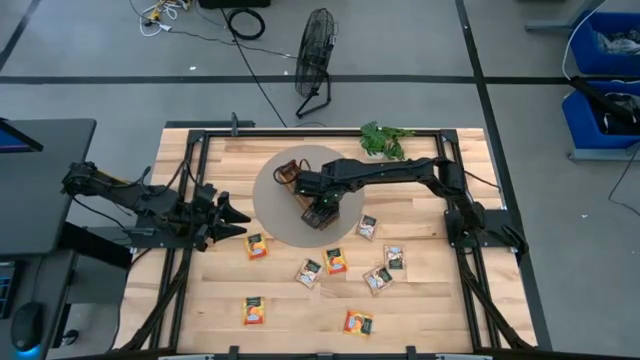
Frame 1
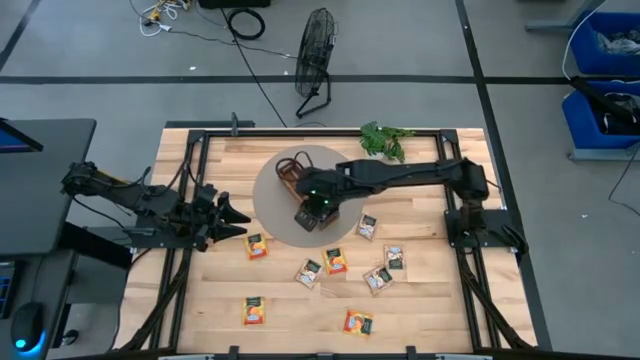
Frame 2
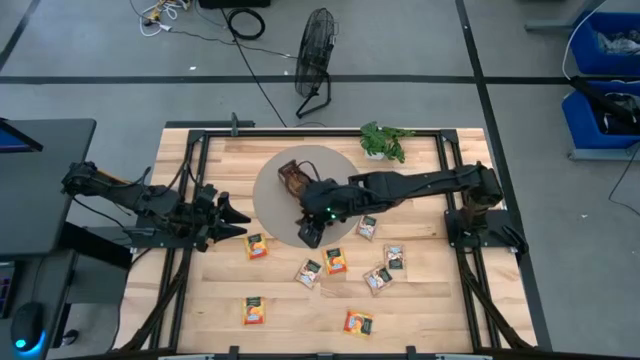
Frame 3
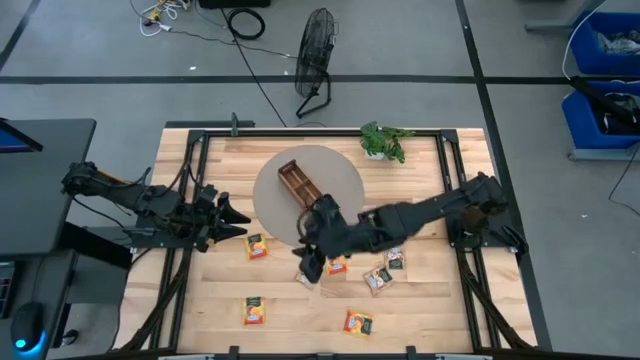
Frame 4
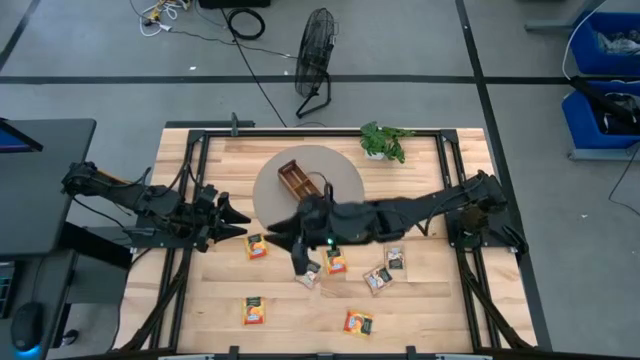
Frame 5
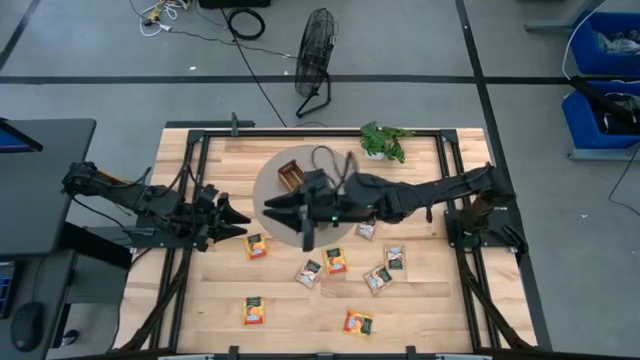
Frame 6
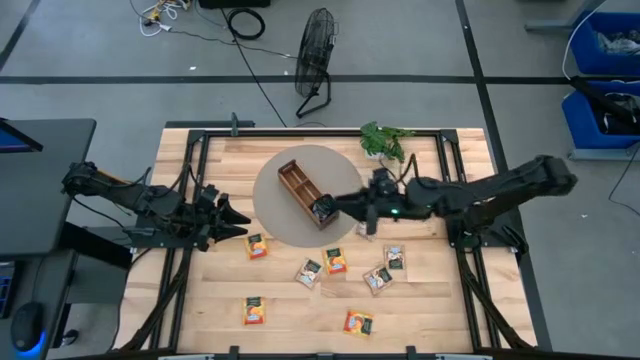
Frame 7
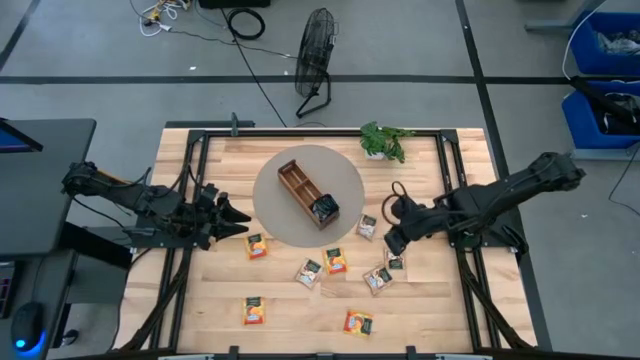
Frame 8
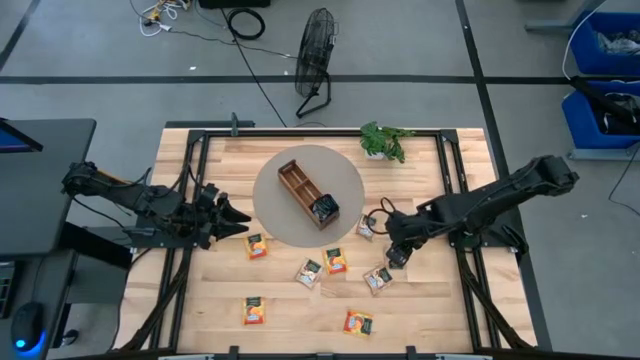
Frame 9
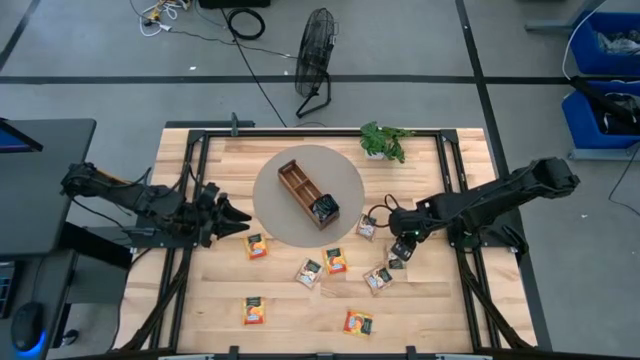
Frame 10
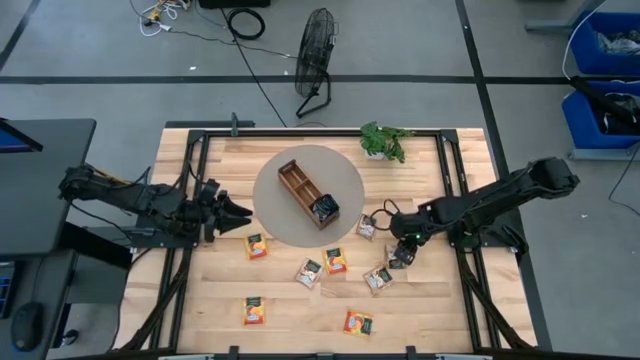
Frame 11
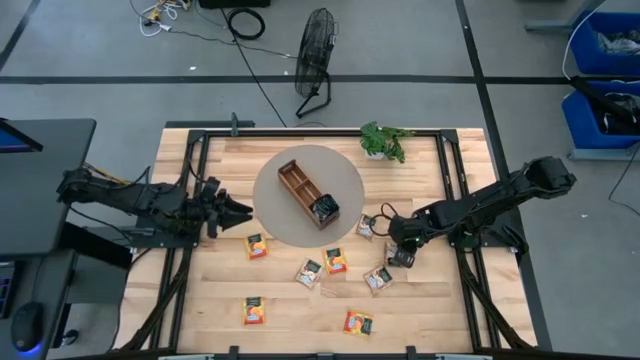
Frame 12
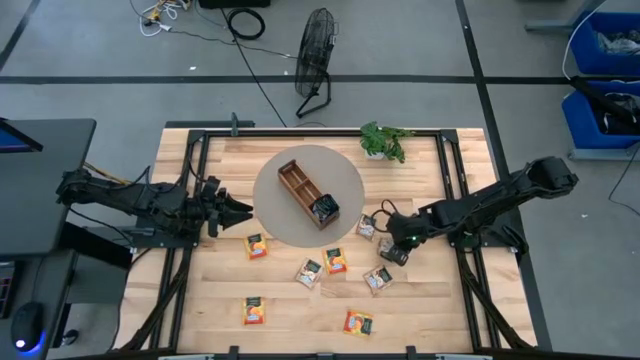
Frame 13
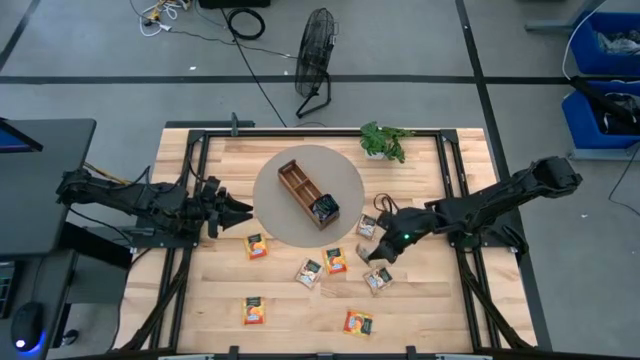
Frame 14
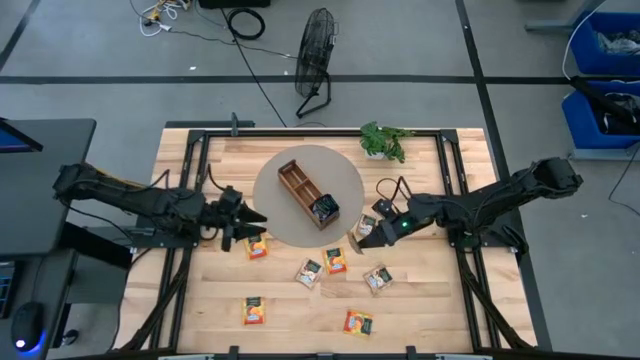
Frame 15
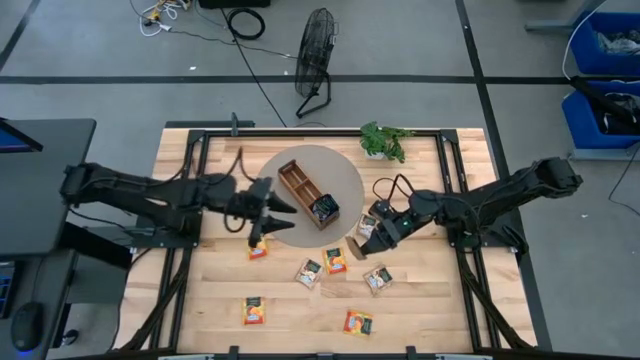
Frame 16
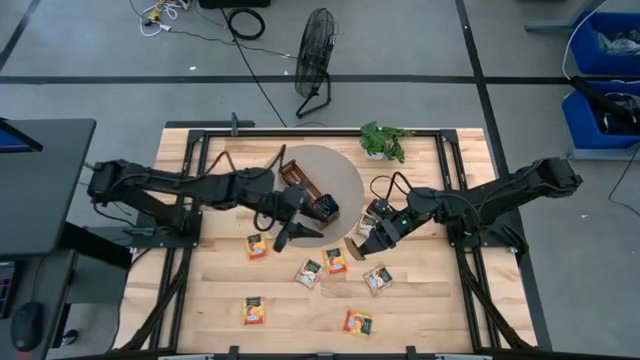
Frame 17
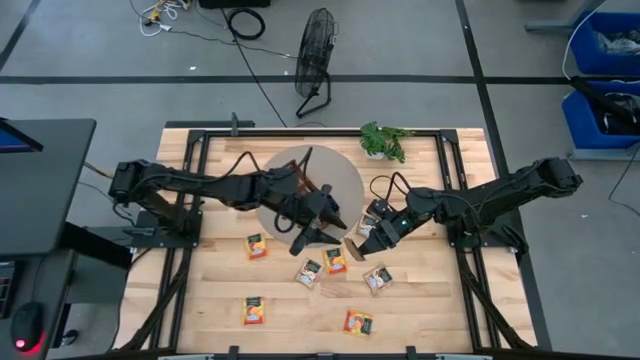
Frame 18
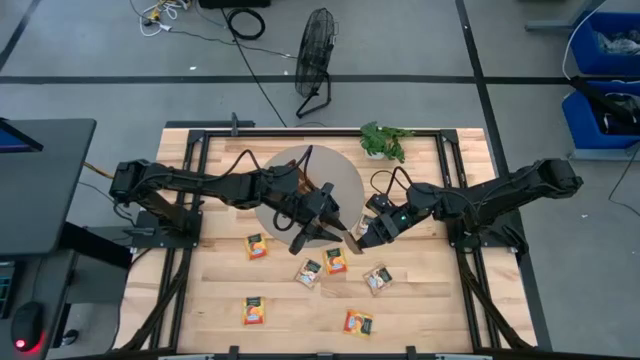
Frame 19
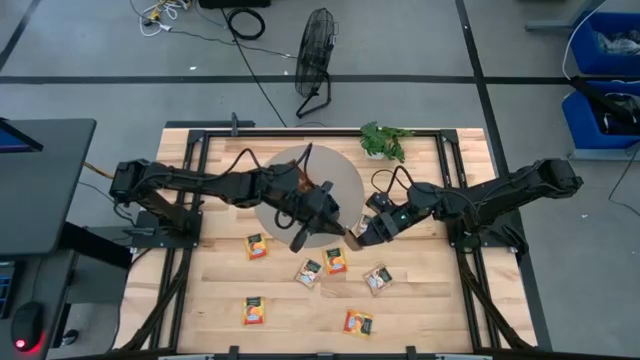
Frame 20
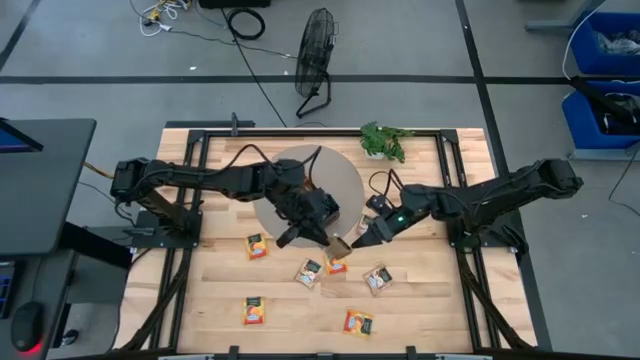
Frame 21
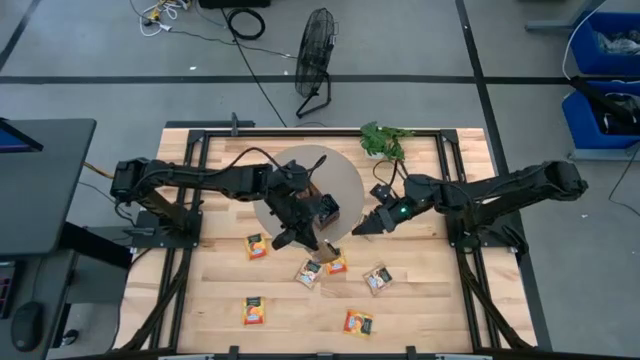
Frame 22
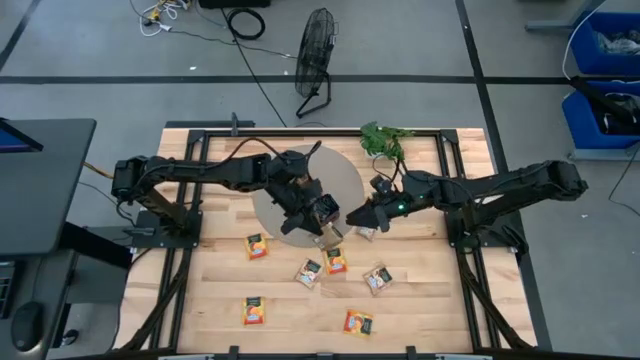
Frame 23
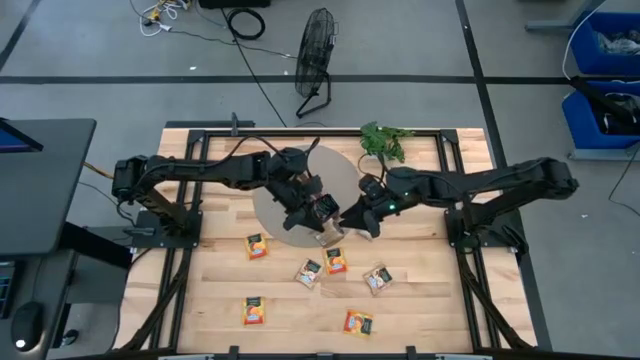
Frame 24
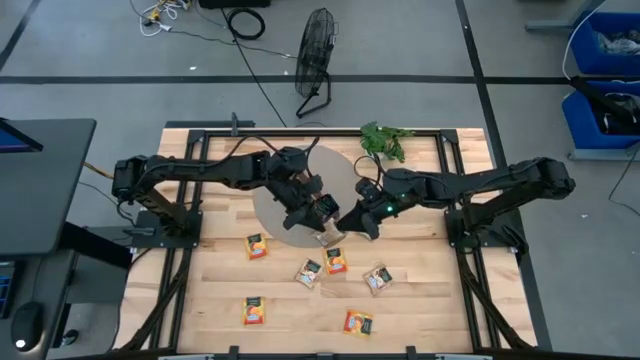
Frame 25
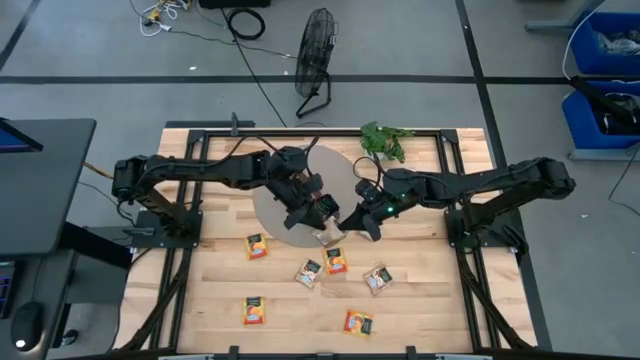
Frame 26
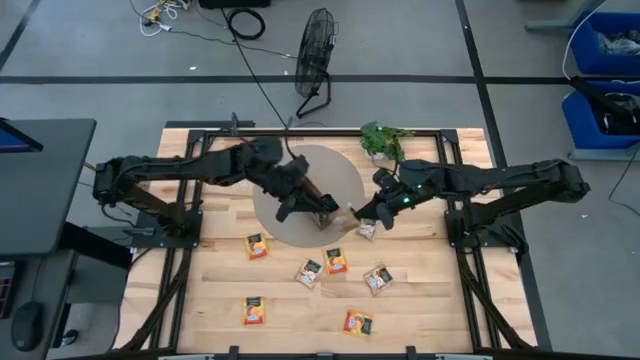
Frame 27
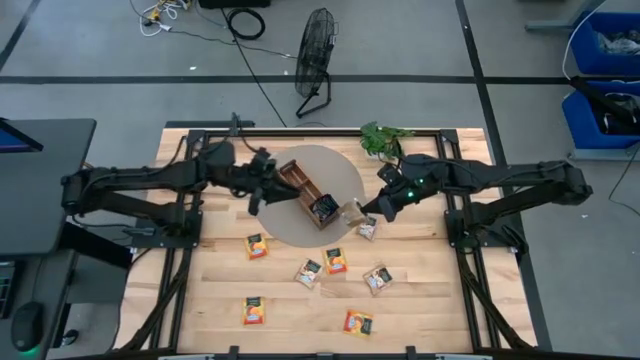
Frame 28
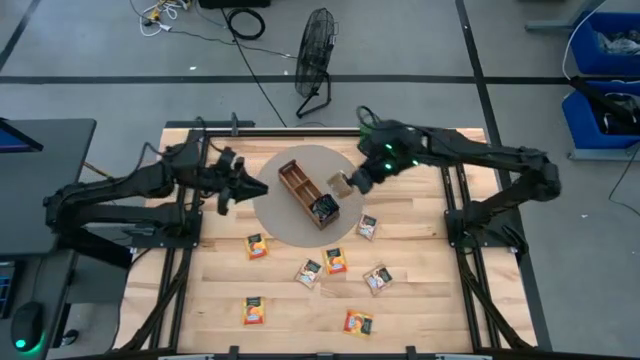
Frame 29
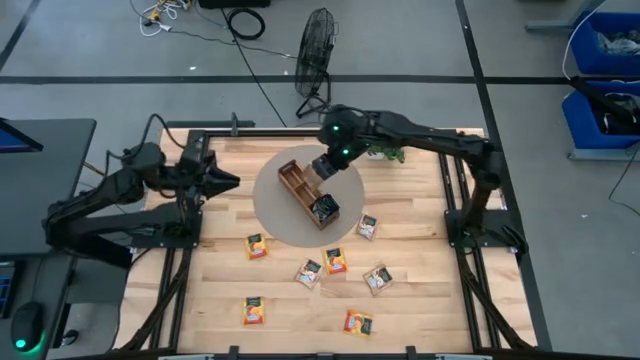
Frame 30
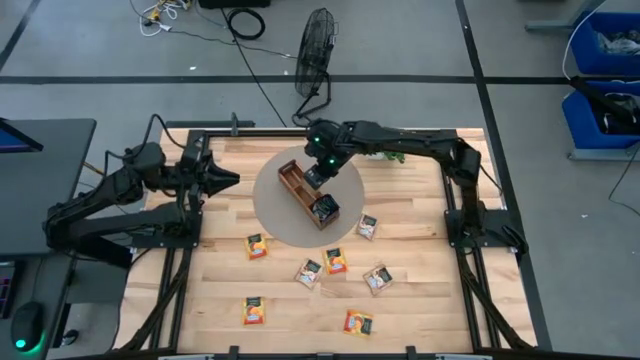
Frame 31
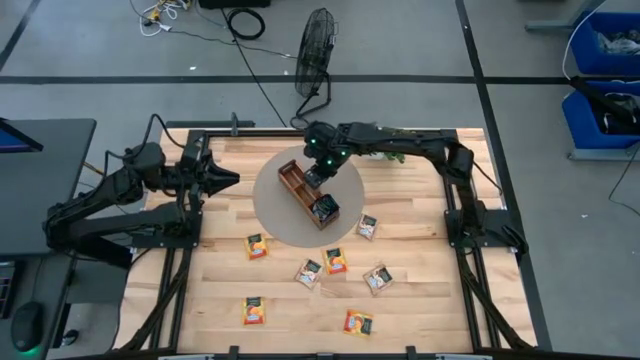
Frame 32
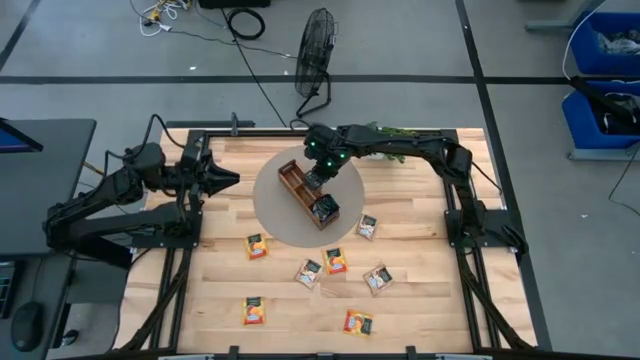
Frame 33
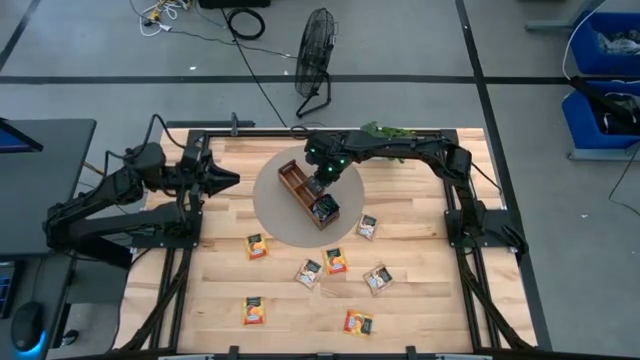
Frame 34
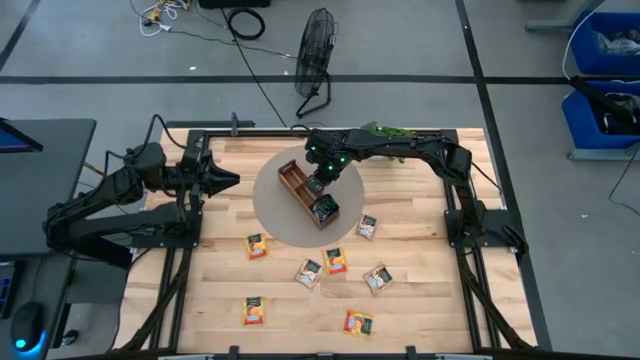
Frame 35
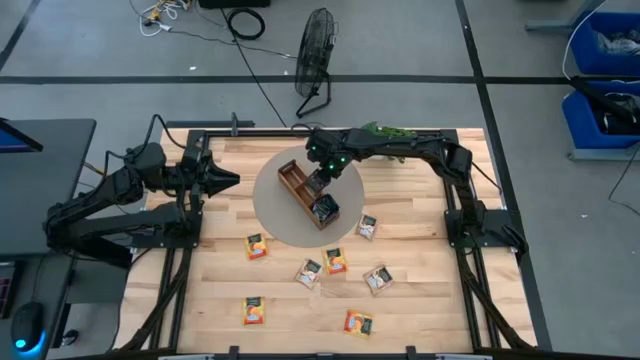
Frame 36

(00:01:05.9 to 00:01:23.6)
Task: Pick & Place Tea
Put the brown tea bag into the middle section of the wooden organizer

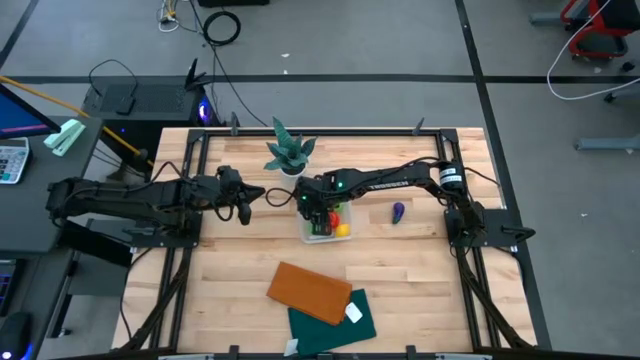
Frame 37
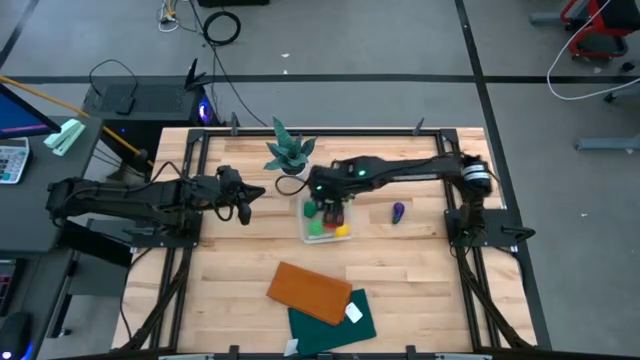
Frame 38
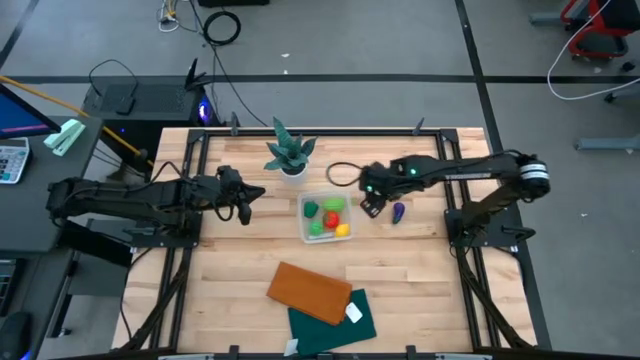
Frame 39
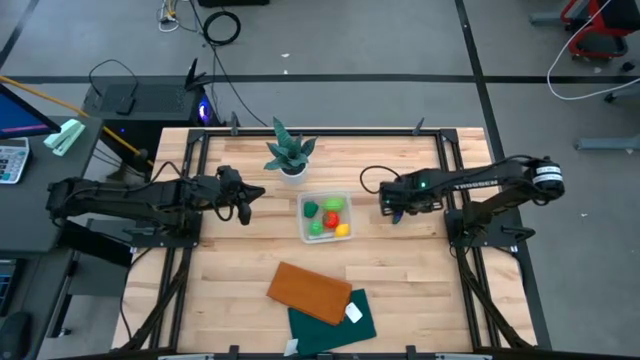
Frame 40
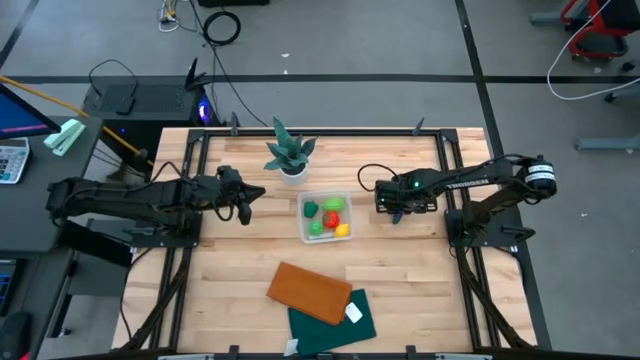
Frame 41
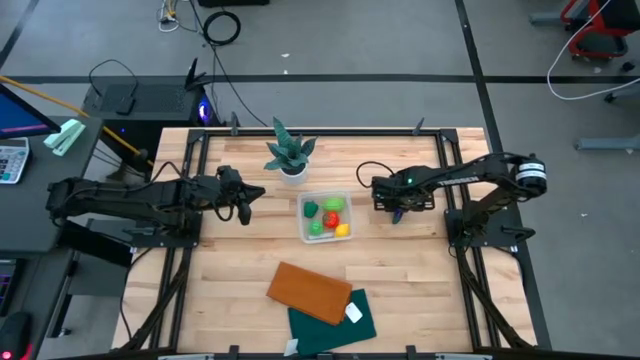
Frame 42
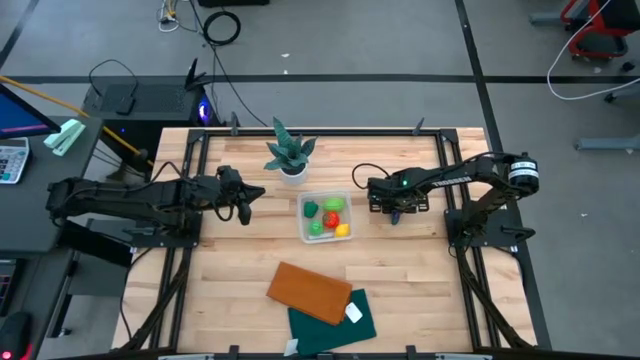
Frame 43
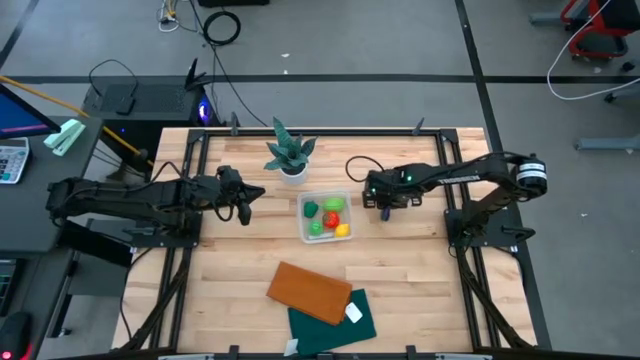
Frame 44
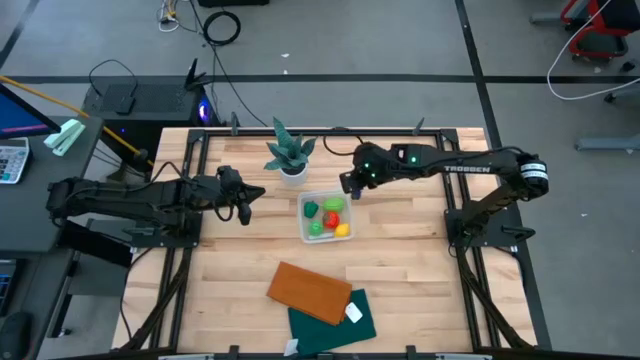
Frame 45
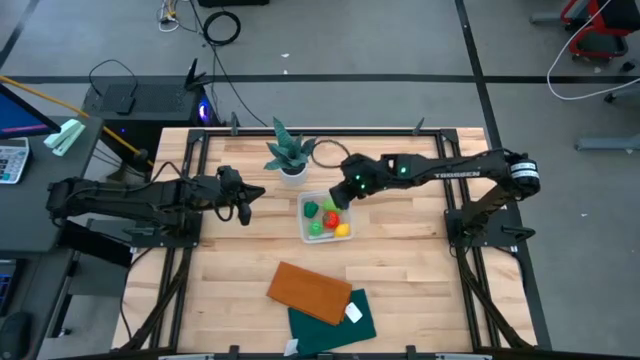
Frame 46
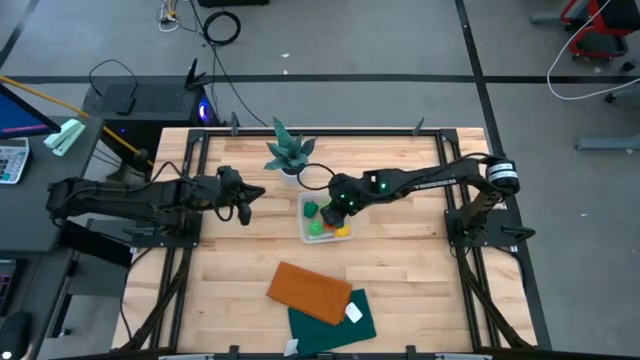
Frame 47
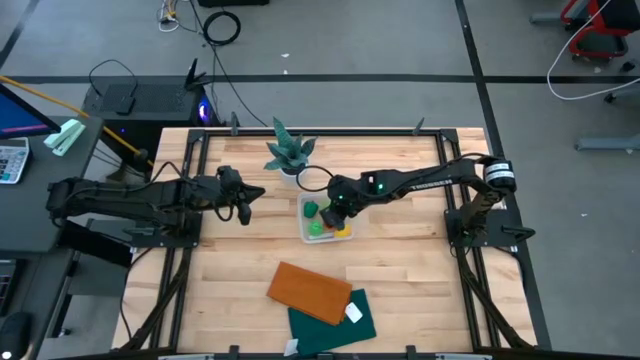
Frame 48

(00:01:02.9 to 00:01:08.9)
Task: Pick and placing Produce into tupperware
Put the eggplant into the transparent bin
